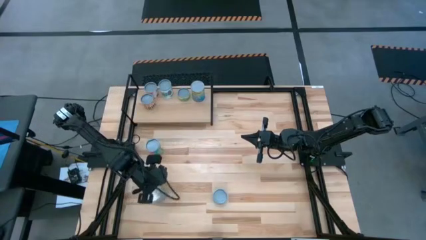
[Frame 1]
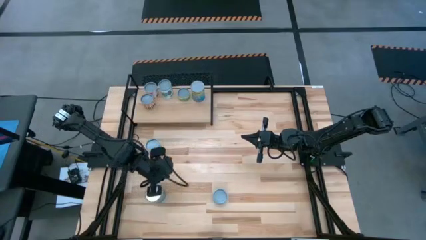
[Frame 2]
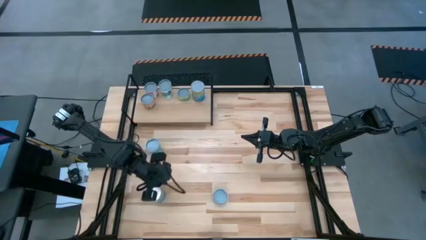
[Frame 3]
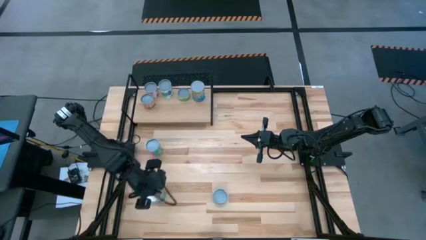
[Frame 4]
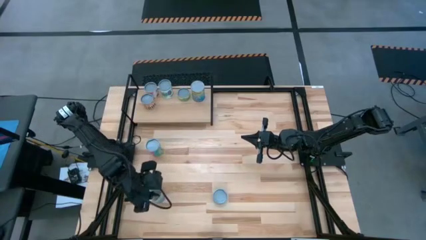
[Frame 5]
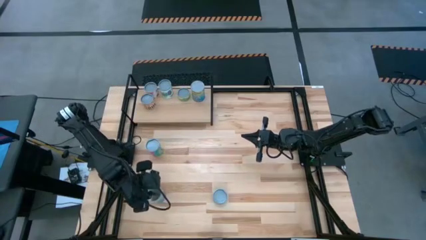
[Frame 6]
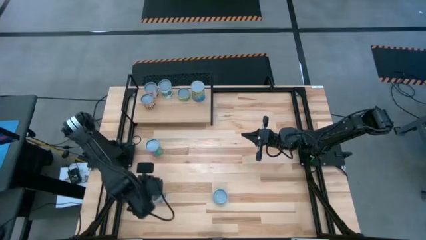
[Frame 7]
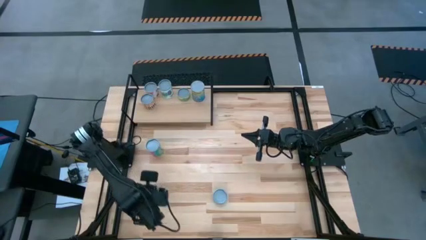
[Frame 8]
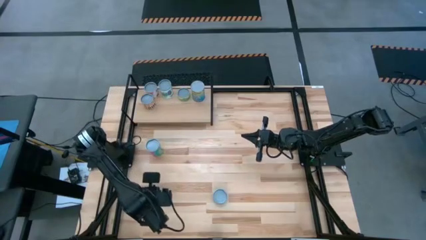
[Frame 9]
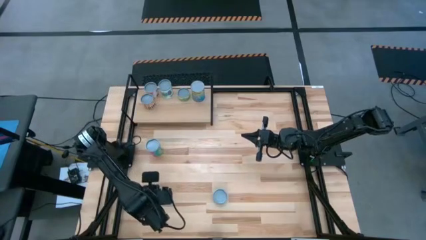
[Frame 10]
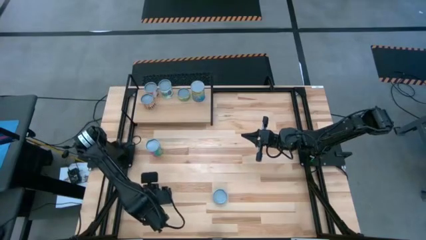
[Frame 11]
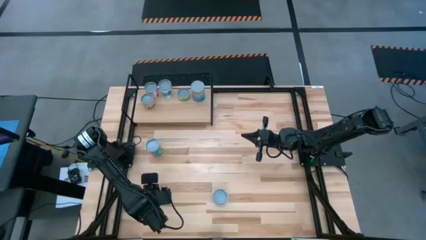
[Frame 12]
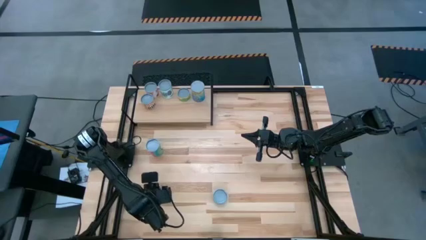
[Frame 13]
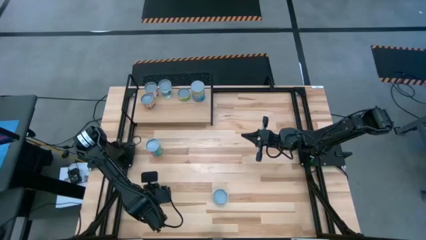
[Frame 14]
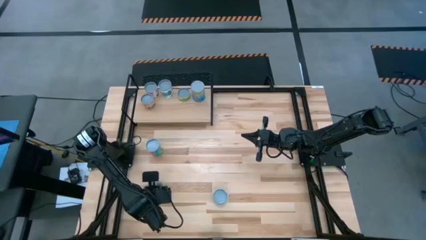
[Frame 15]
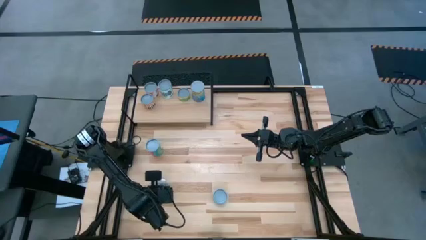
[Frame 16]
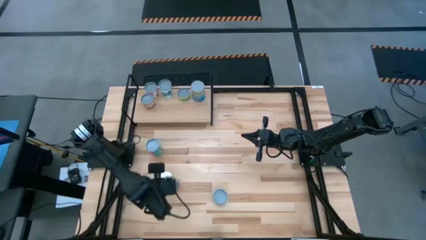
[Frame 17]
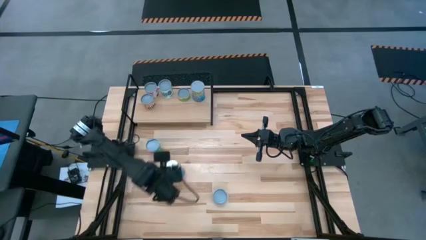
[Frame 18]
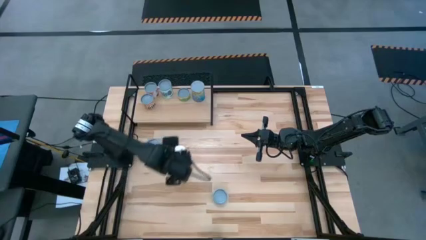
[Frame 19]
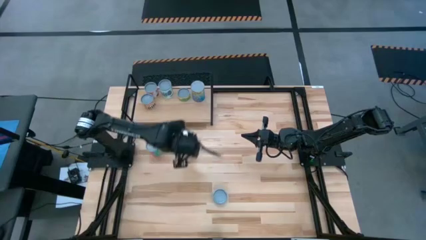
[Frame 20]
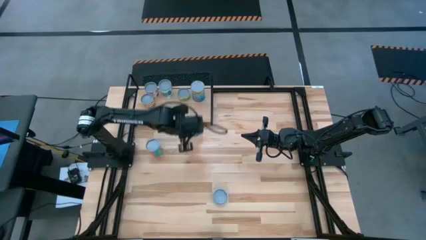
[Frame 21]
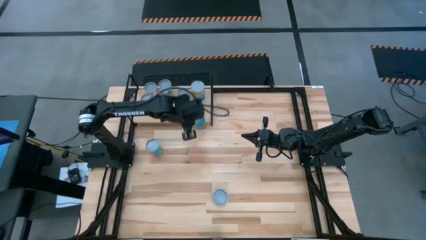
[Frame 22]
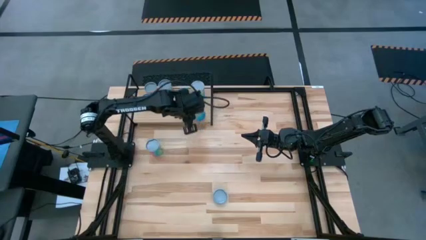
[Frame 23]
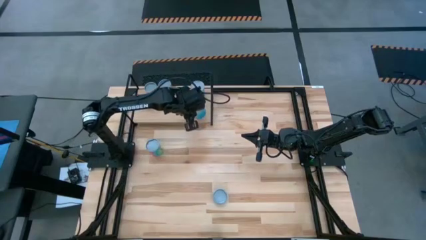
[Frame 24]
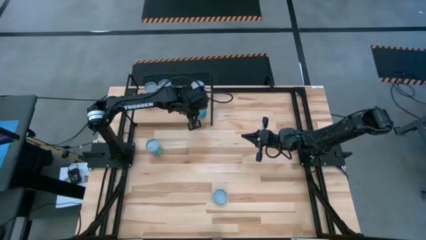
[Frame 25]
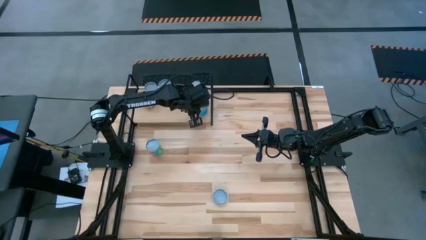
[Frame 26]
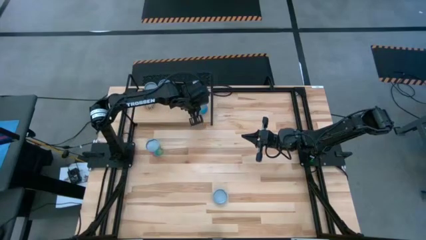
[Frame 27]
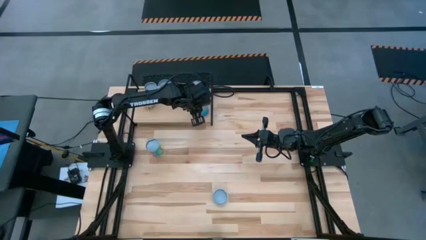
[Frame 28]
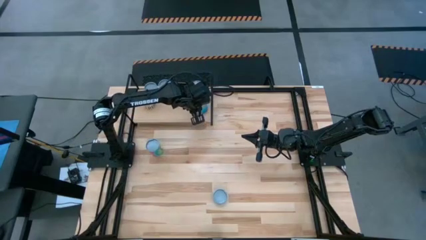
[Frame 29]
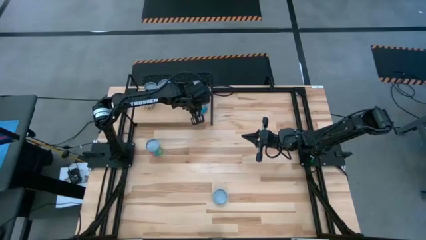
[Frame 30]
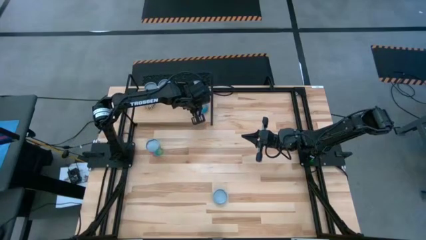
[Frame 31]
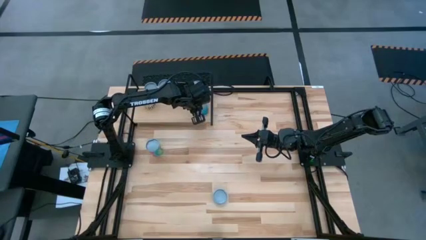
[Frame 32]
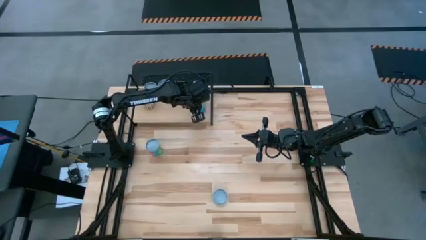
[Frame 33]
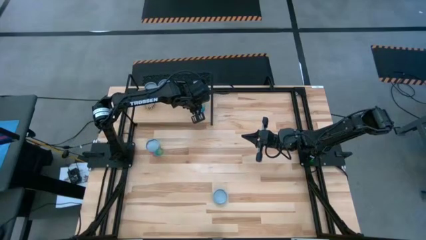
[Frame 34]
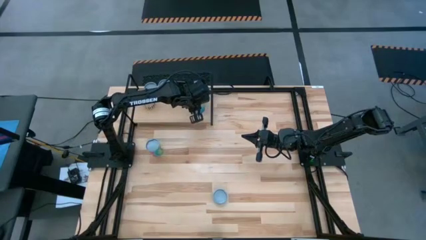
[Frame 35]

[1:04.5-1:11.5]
Task: Pick and place cans onto a shelf
Put the canned cherries on the shelf

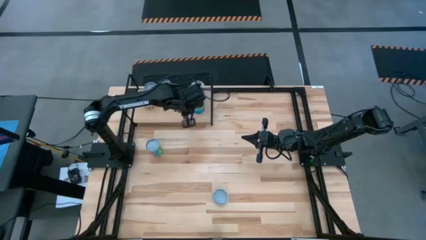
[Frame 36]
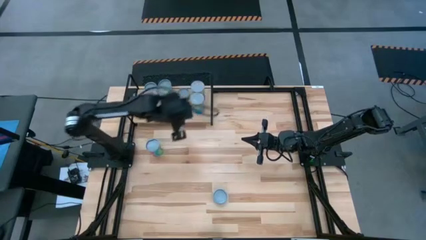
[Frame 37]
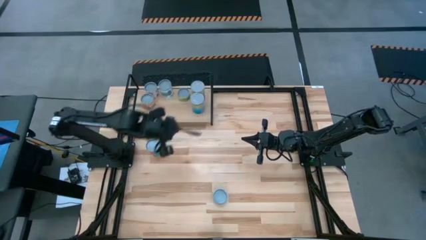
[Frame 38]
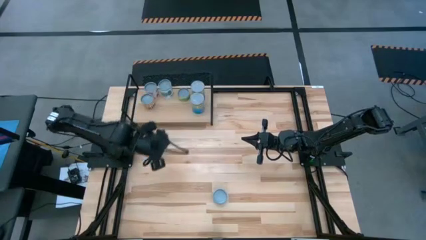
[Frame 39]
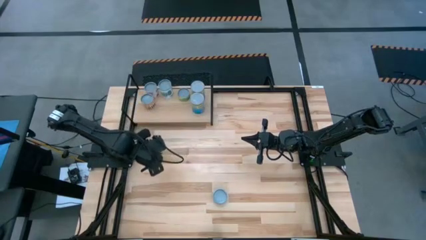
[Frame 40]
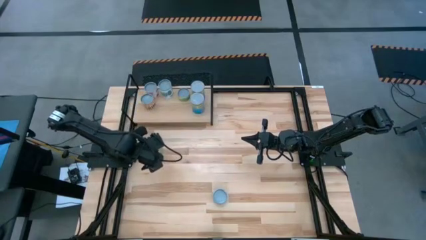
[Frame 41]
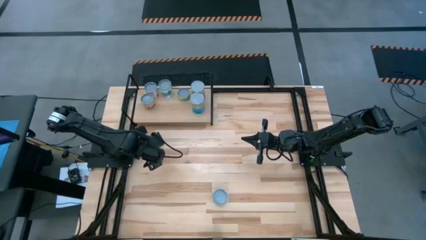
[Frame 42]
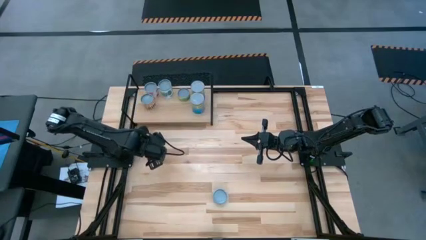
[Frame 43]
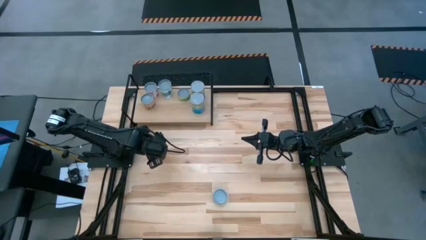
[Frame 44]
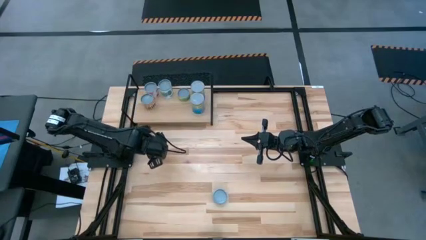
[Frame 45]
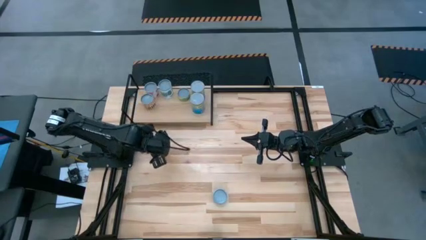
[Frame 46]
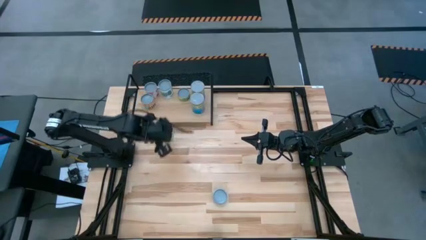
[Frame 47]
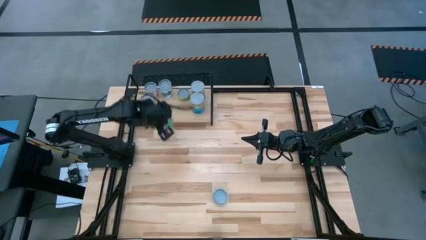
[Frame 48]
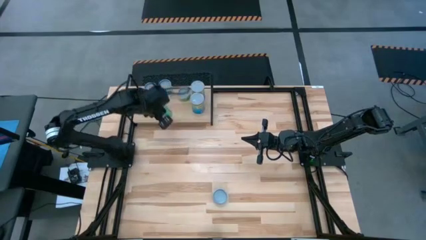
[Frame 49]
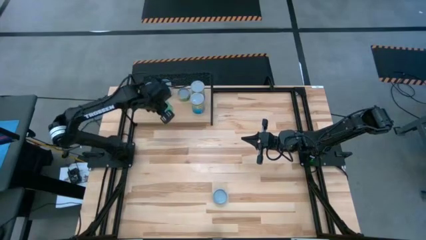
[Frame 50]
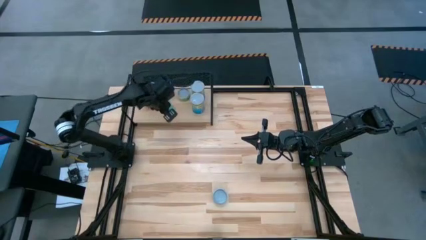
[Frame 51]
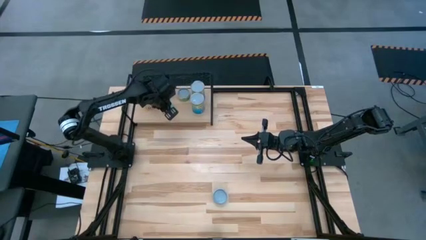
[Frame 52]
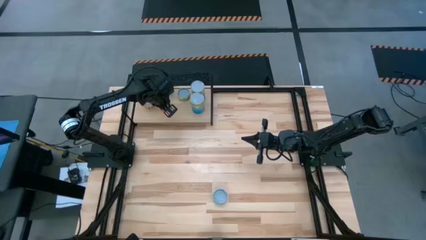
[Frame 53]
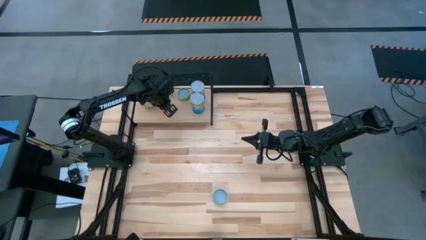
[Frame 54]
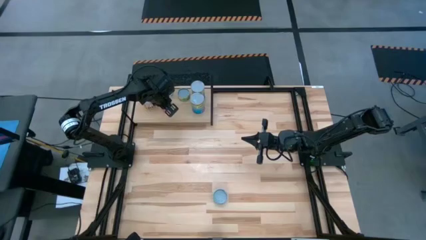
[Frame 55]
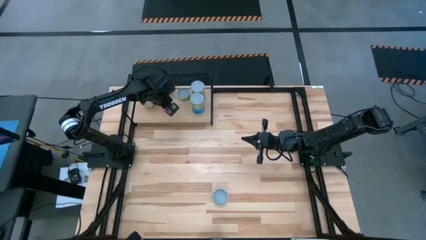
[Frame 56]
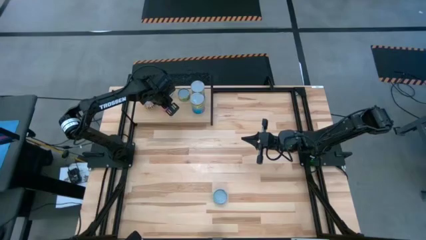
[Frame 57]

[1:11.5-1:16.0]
Put the canned green on the shelf

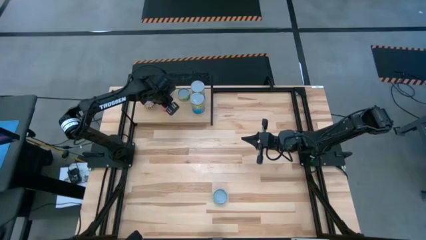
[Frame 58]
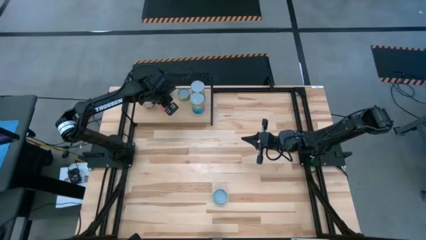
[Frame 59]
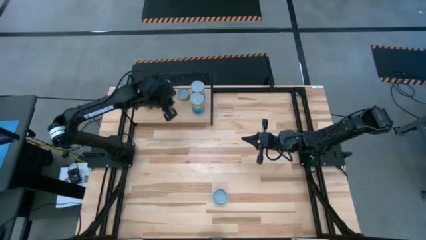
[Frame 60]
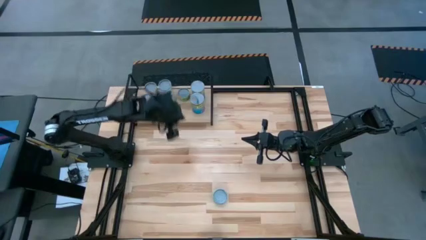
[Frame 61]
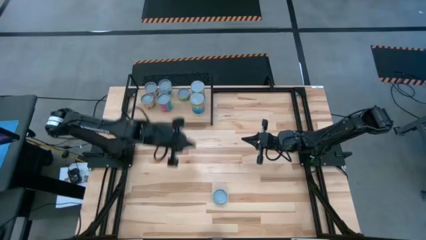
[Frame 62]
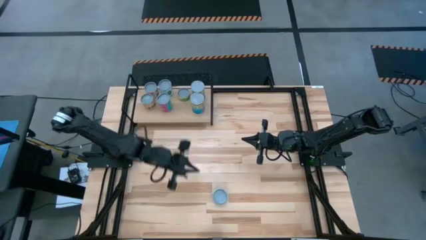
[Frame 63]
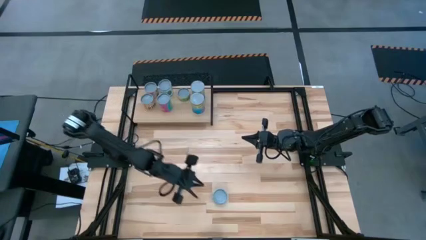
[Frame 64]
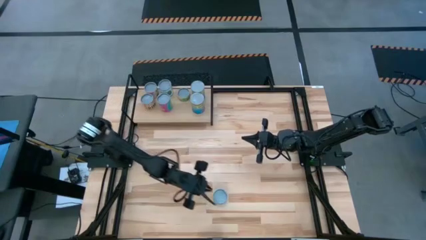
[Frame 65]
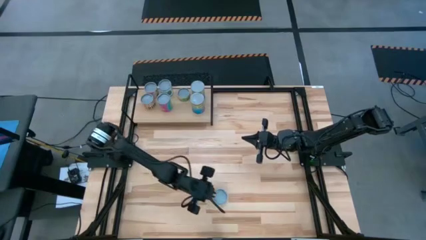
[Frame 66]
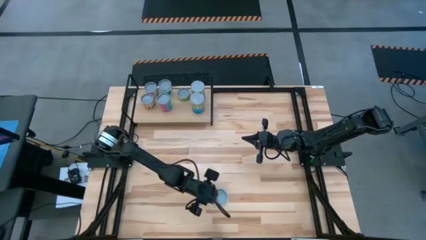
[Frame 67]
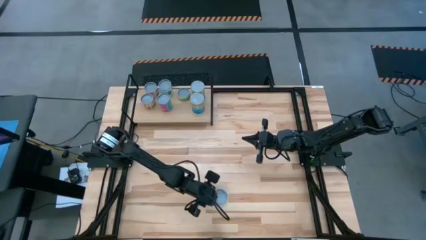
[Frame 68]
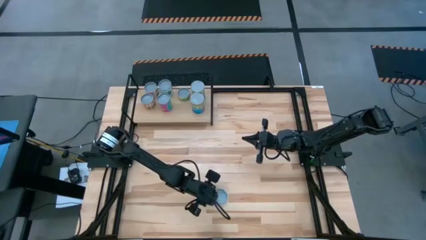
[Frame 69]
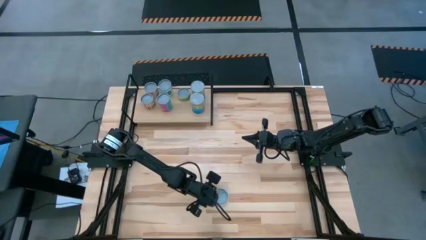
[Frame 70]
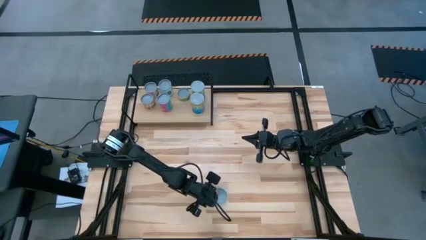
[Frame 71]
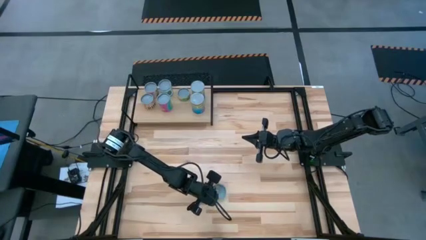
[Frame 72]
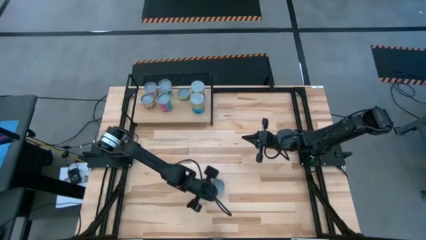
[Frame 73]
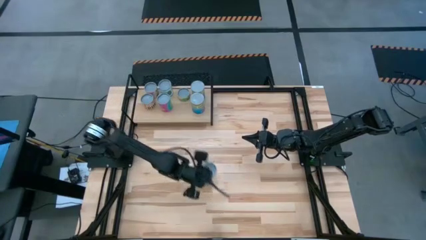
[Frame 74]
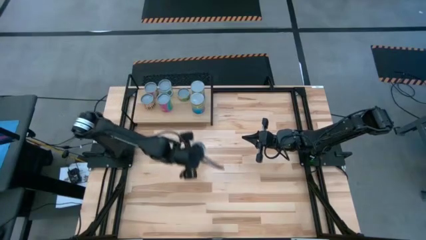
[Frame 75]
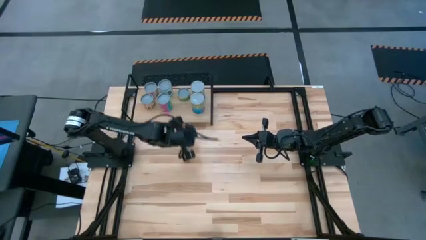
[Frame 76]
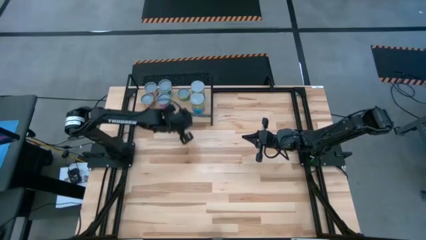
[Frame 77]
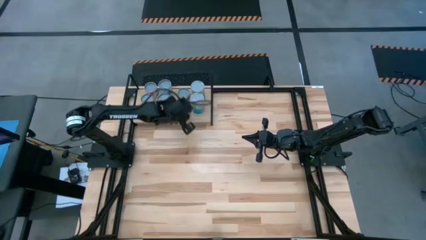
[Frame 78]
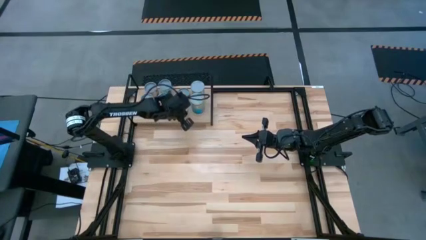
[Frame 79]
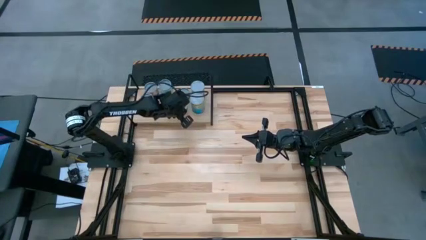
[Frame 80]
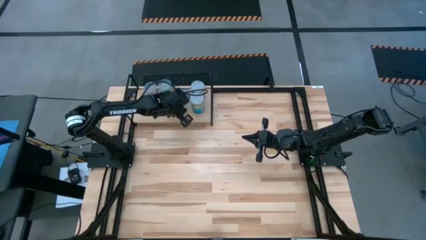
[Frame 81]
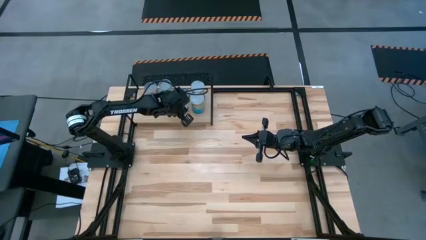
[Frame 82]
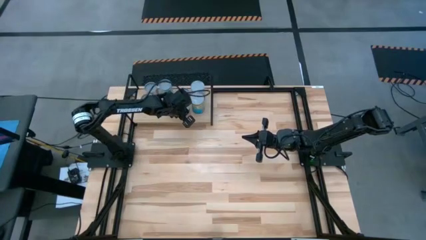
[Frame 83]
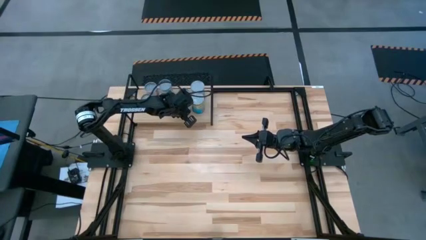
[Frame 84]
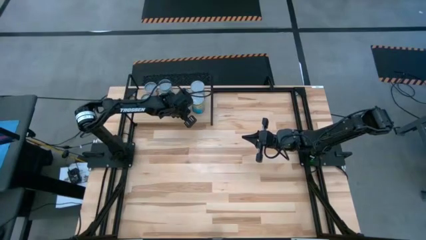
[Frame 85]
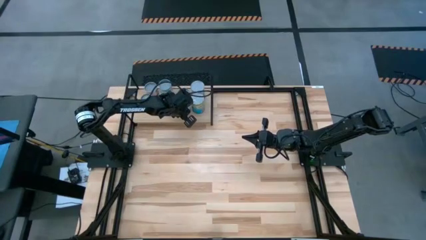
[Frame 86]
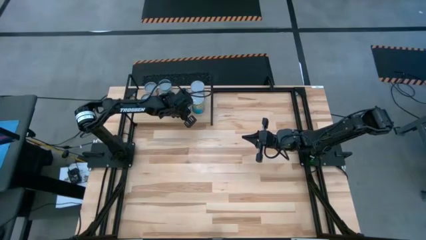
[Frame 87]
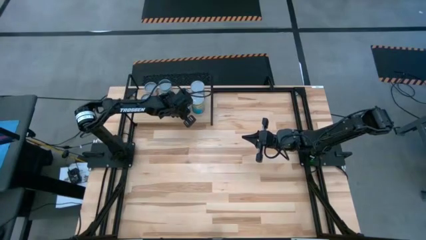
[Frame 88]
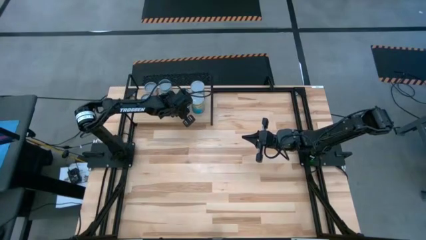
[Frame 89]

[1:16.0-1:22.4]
Put the canned tuna on the shelf
